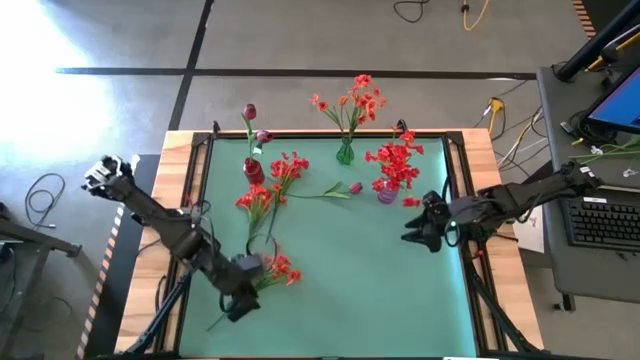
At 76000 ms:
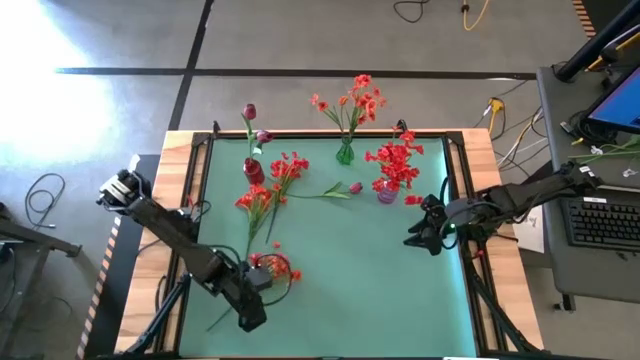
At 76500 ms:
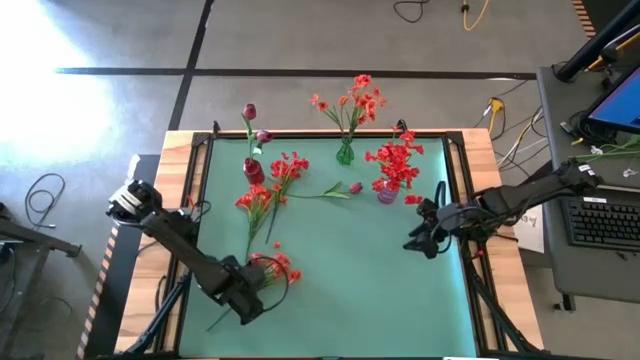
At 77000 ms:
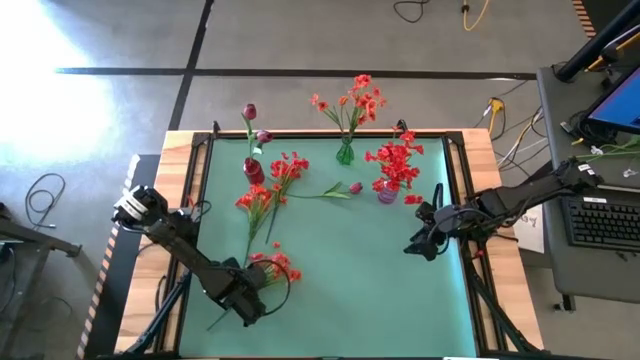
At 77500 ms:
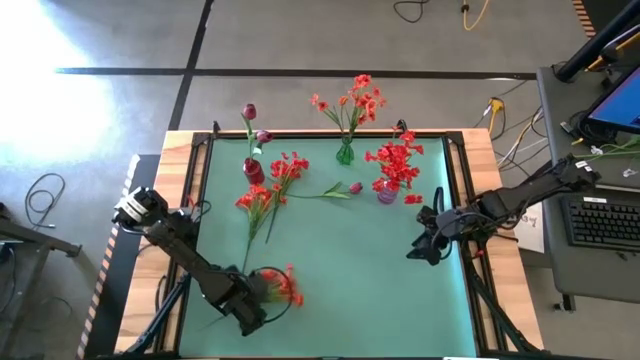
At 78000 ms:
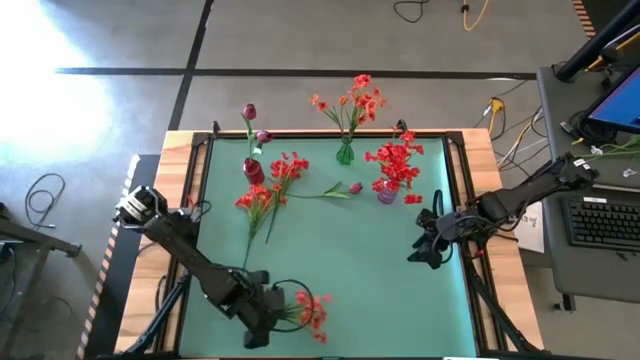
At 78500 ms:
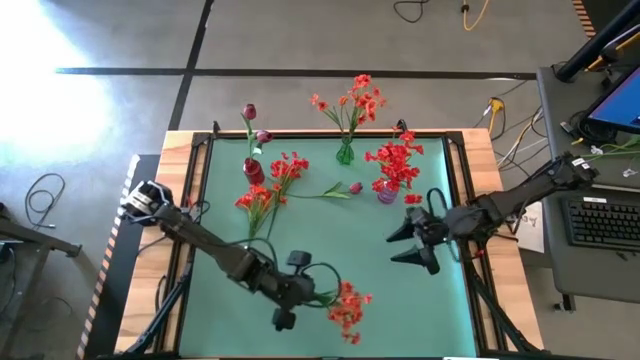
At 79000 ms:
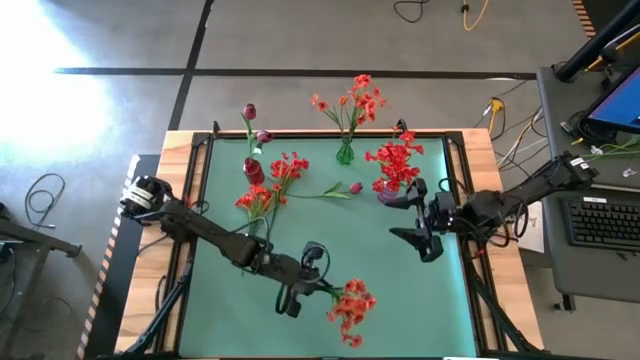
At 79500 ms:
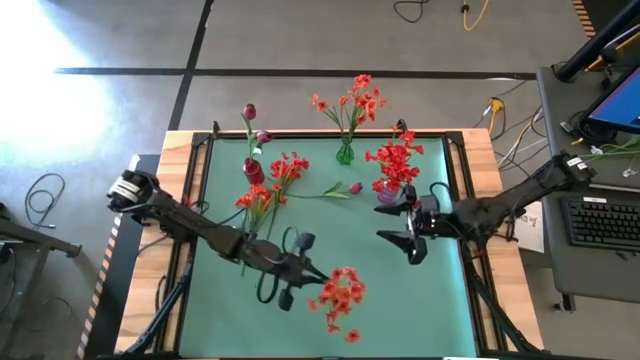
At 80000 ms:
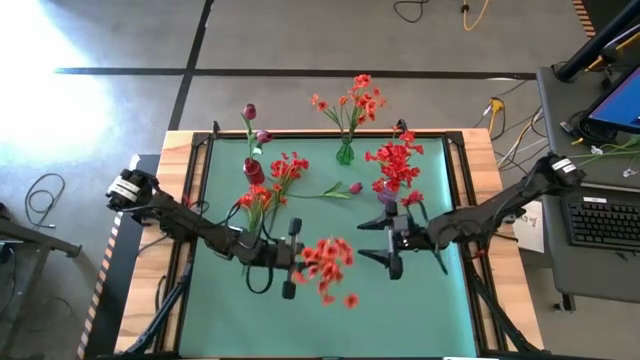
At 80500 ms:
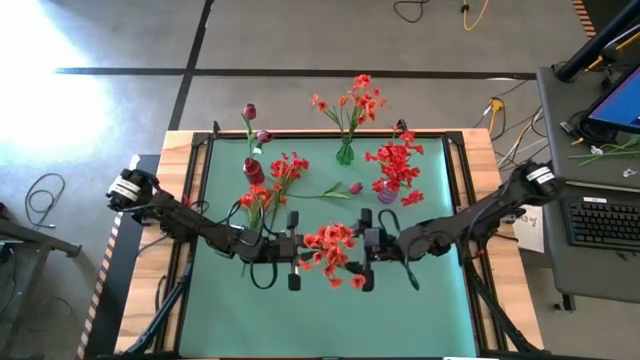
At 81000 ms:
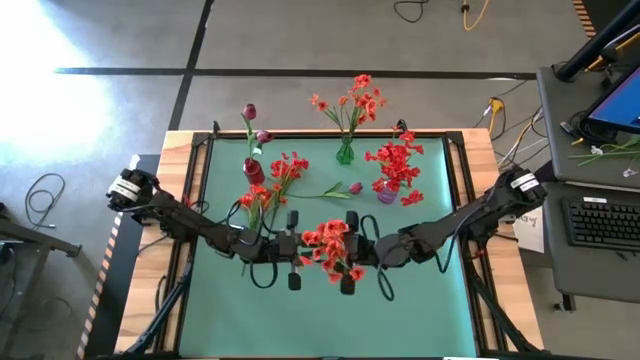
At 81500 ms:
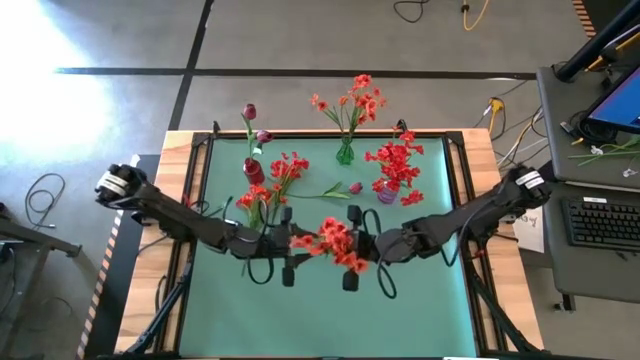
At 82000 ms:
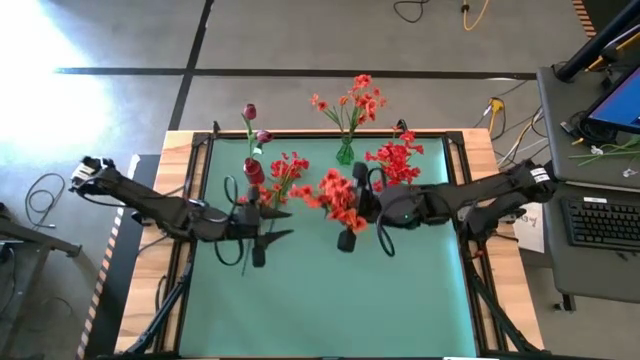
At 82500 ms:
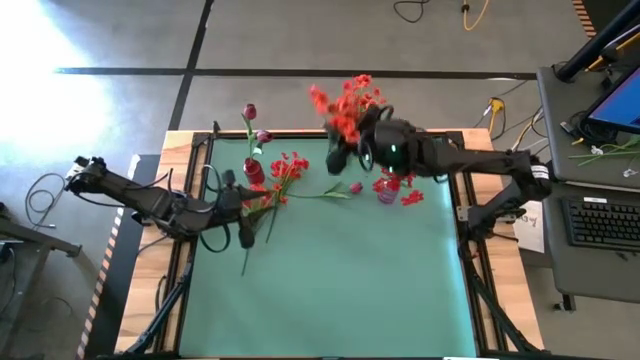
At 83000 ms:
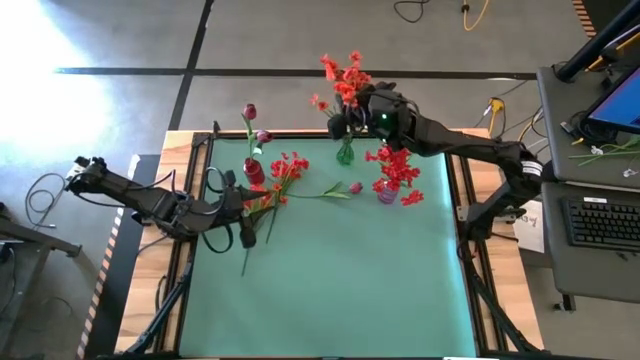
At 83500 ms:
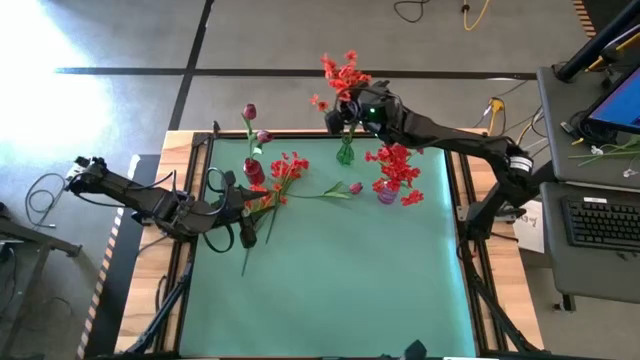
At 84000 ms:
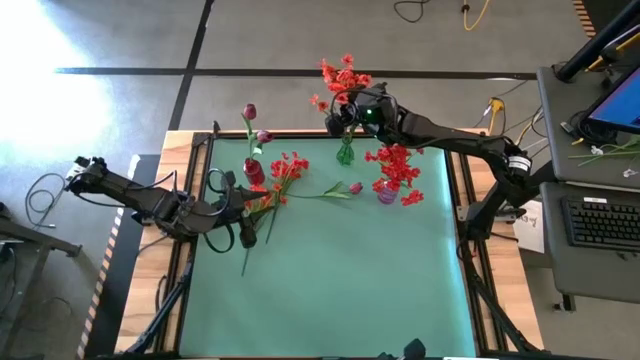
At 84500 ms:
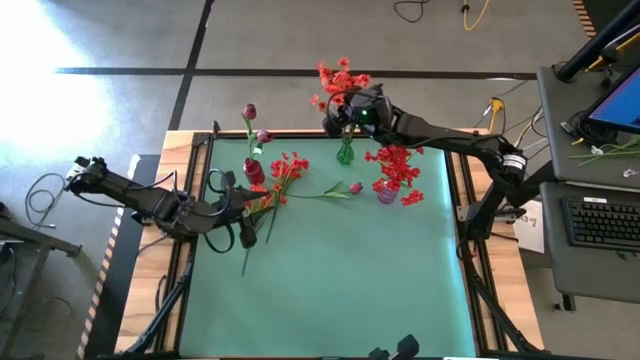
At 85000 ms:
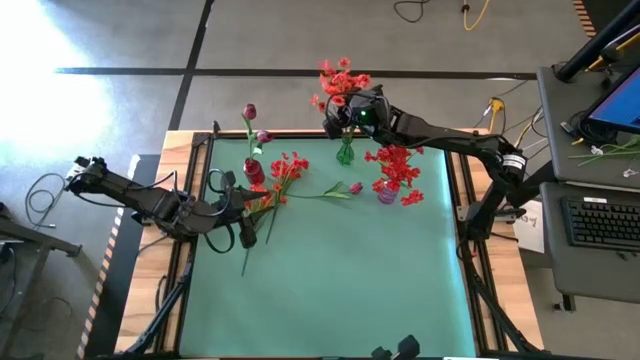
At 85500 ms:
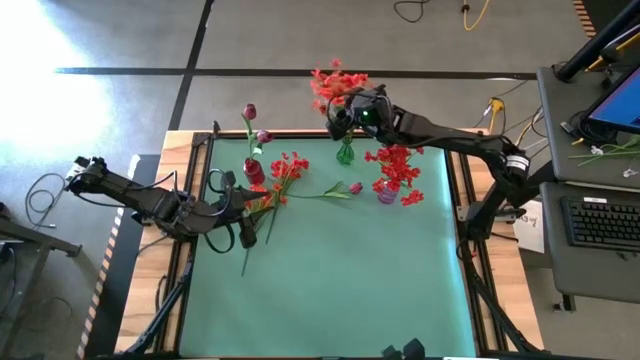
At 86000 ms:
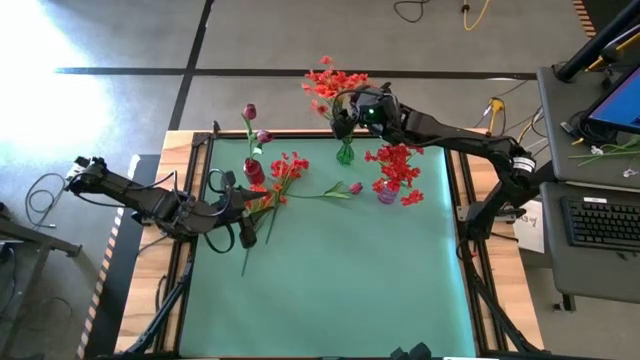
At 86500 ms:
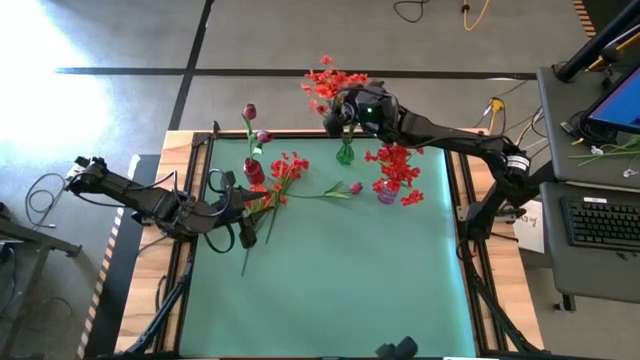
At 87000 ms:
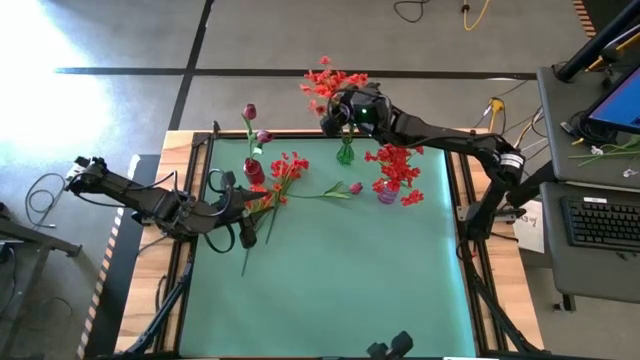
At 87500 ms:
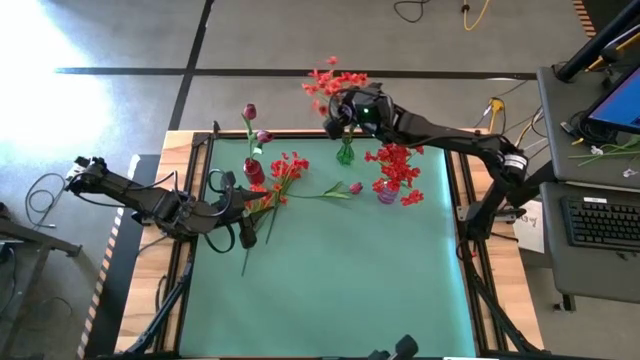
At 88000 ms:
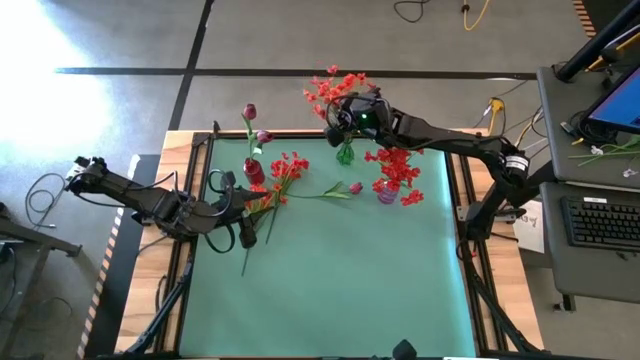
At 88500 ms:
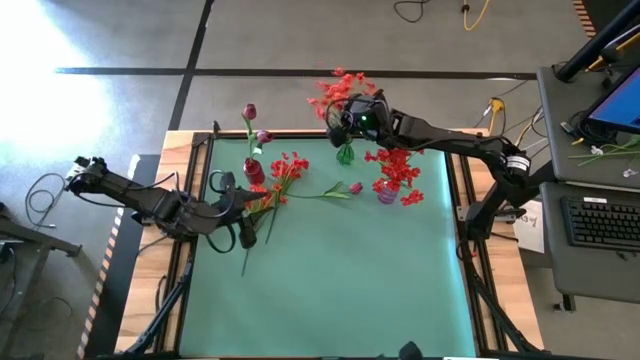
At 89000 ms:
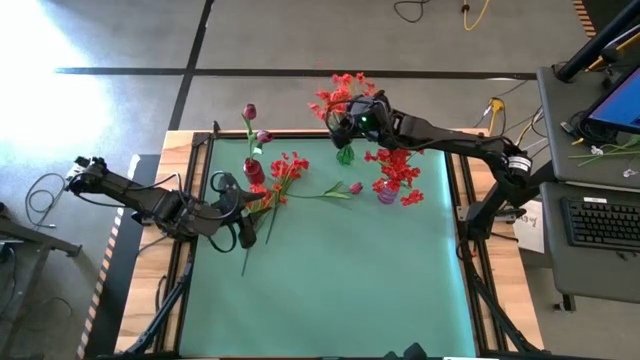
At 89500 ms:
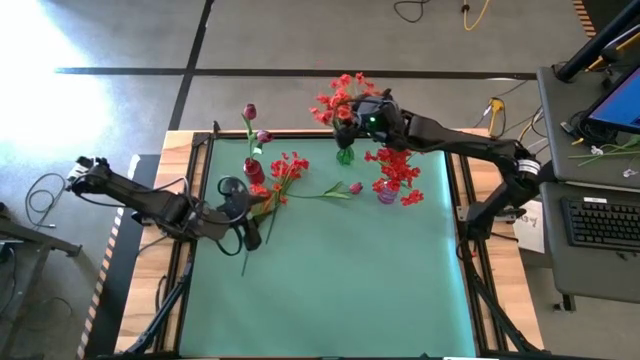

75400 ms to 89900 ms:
Task: Sort flowers into vase by color
Put the bottom orange flowers into the green flower vase

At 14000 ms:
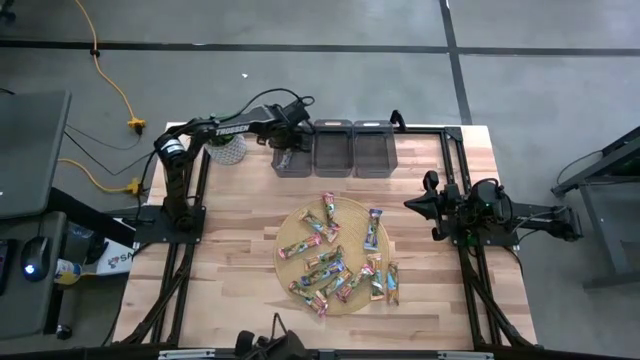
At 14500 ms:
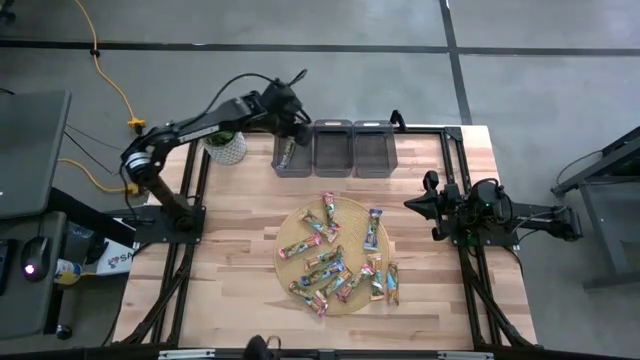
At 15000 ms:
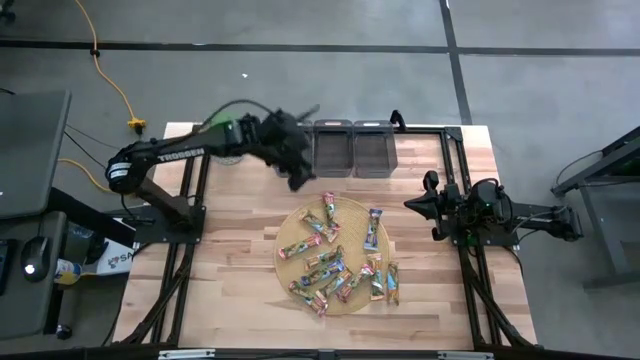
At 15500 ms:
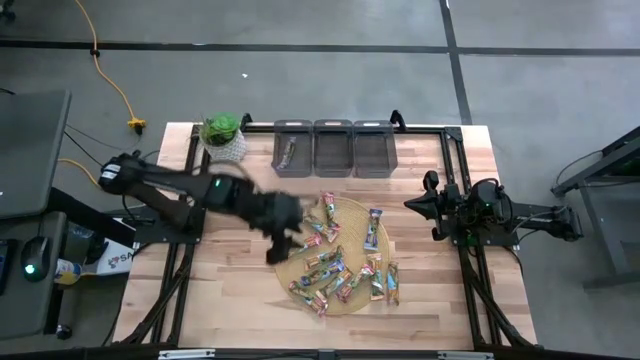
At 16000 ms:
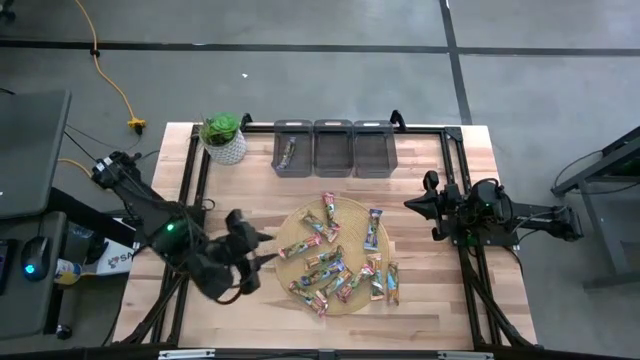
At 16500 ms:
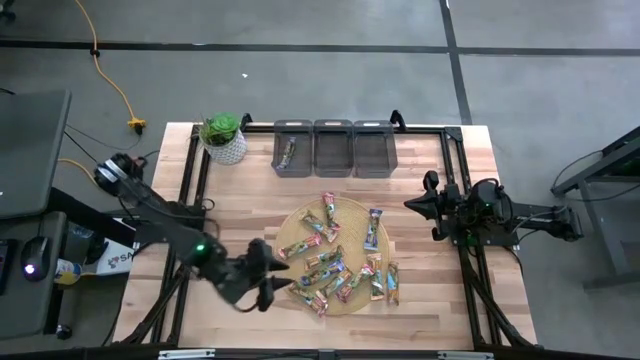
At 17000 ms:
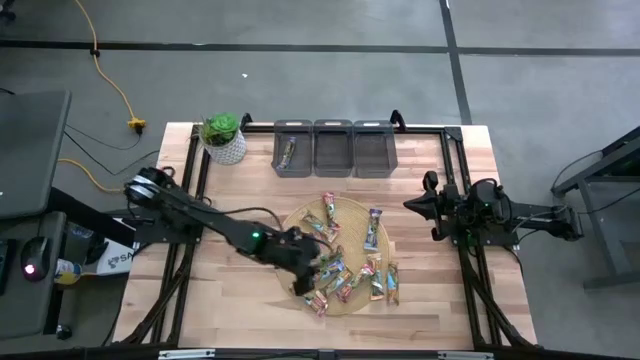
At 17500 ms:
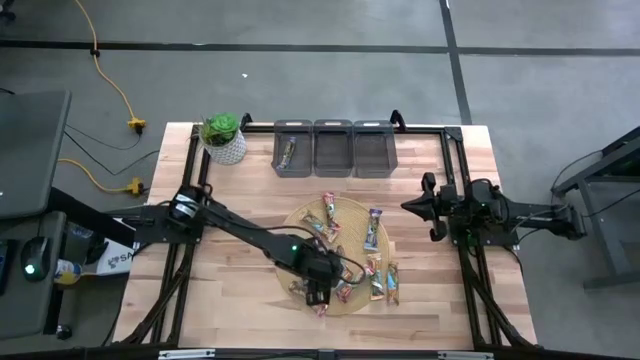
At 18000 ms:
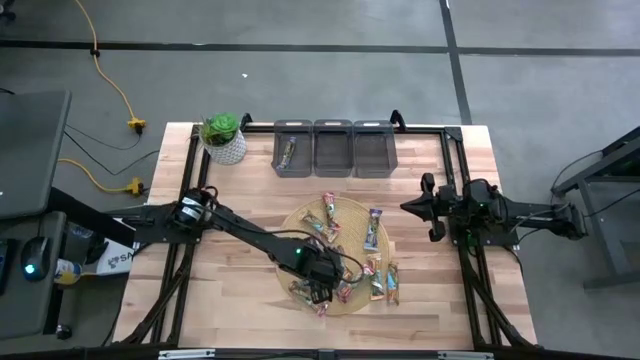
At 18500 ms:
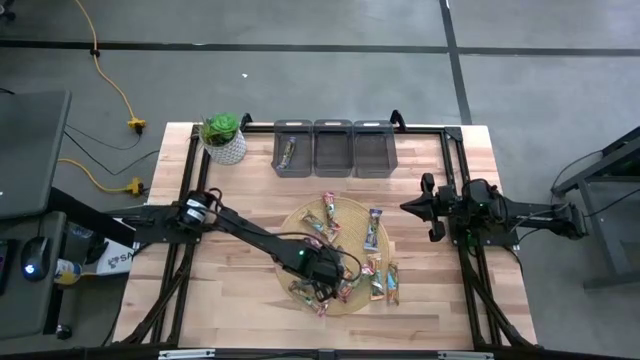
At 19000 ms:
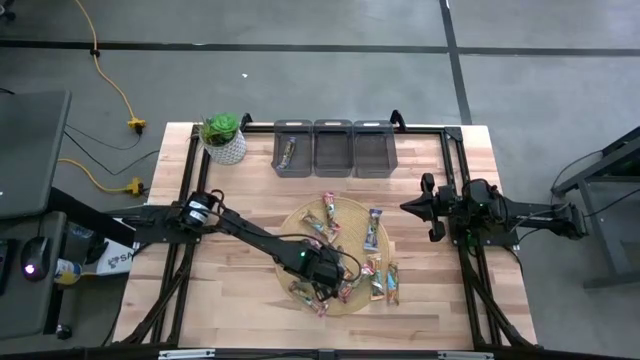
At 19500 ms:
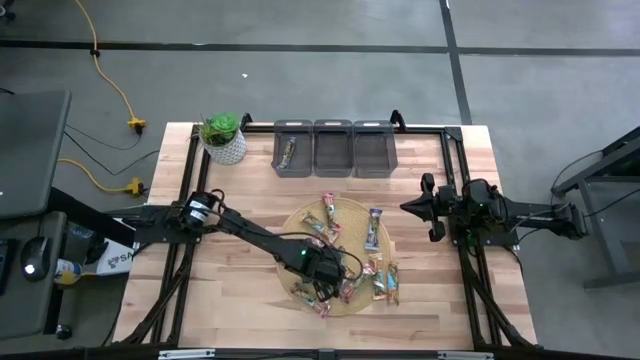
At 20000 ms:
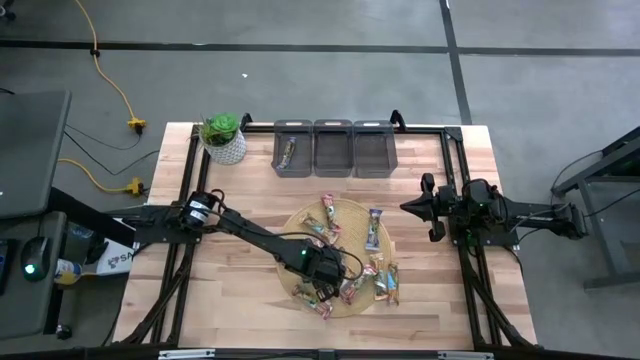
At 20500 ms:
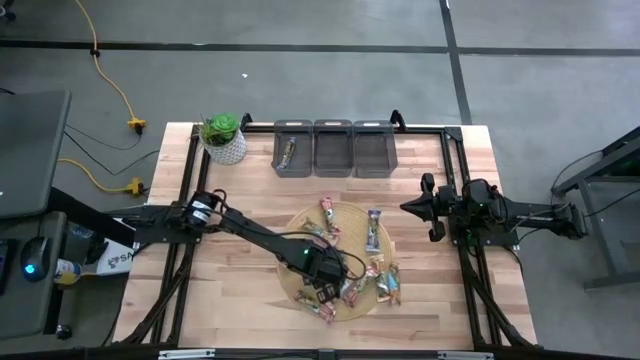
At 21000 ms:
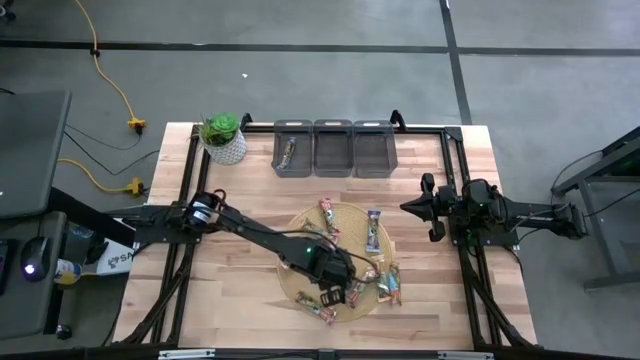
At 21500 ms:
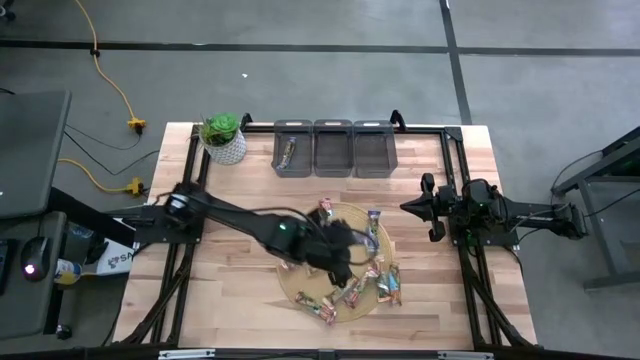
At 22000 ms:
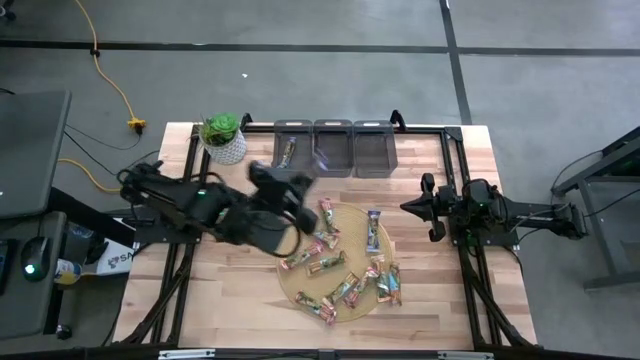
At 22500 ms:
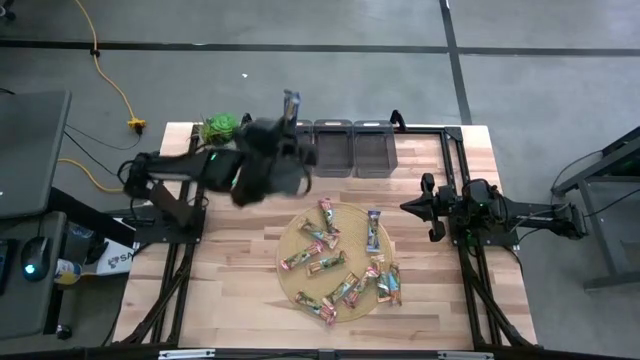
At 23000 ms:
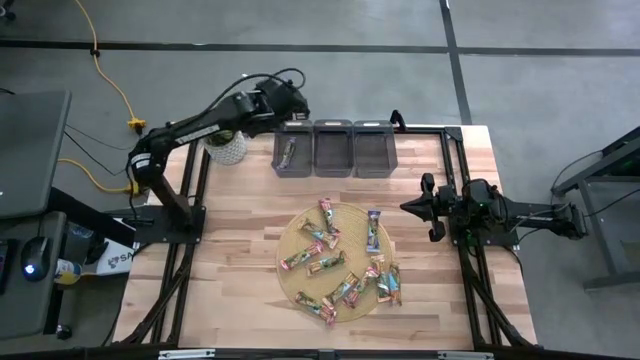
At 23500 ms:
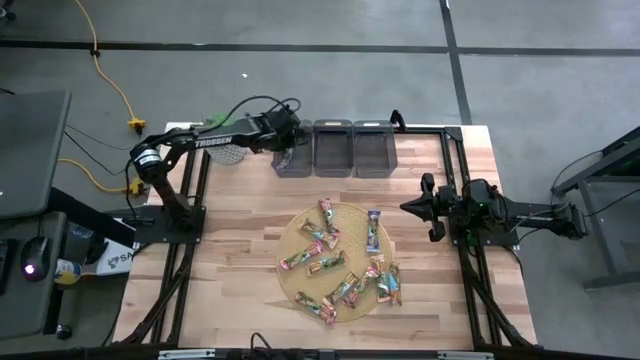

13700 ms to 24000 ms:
Task: Pick and place Granola Bars by type
Put the blue granola bar into the left black bin
